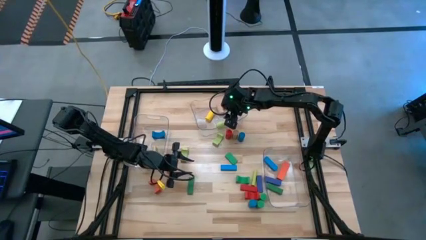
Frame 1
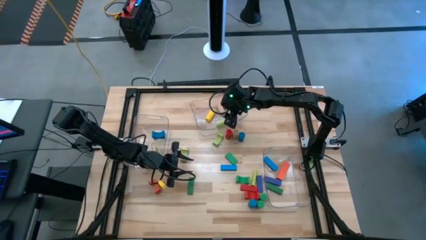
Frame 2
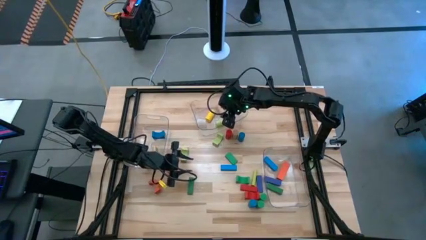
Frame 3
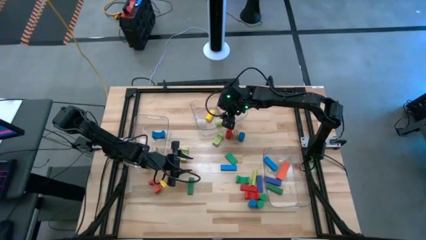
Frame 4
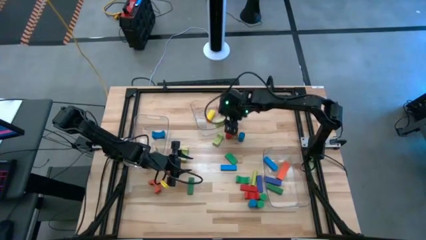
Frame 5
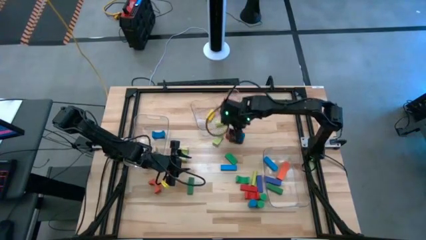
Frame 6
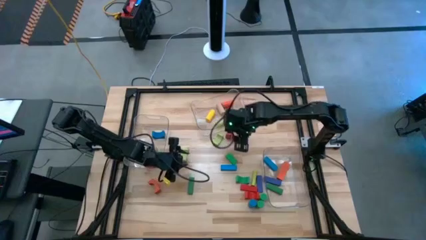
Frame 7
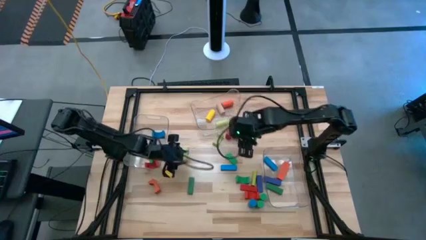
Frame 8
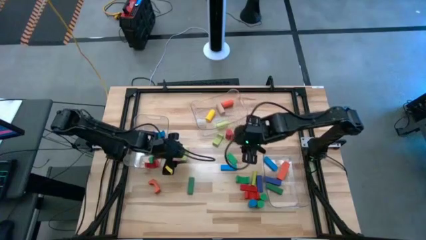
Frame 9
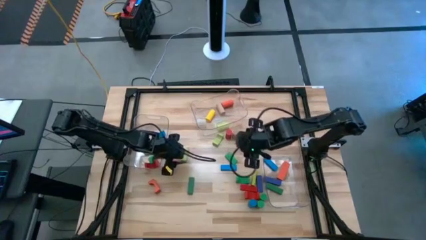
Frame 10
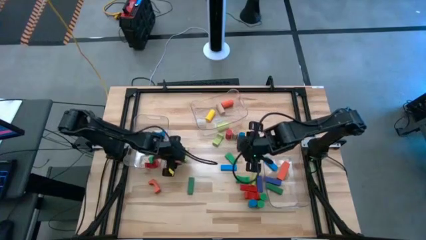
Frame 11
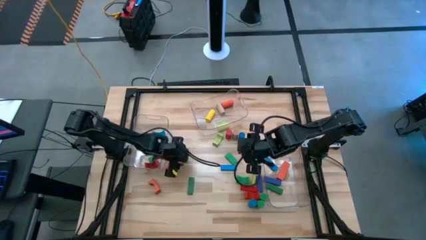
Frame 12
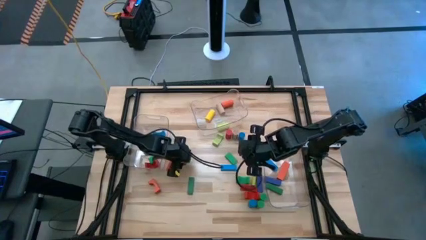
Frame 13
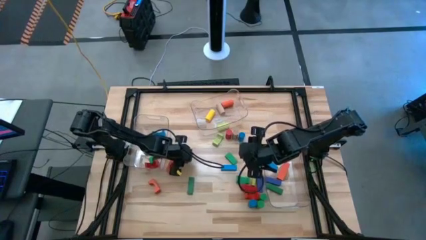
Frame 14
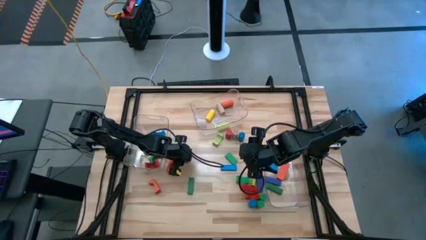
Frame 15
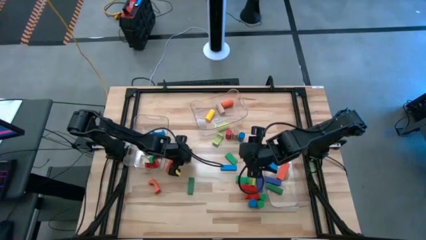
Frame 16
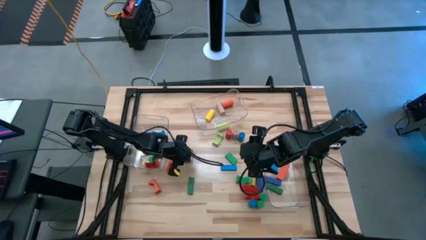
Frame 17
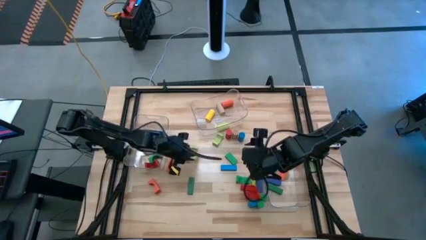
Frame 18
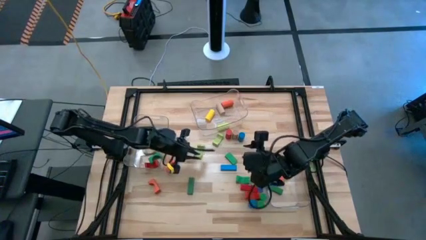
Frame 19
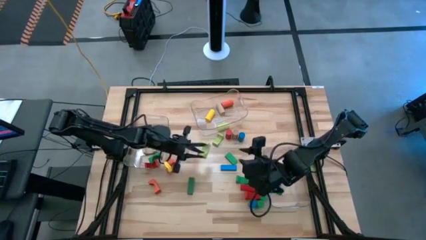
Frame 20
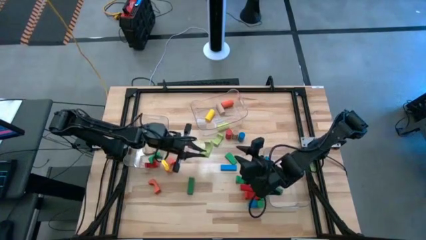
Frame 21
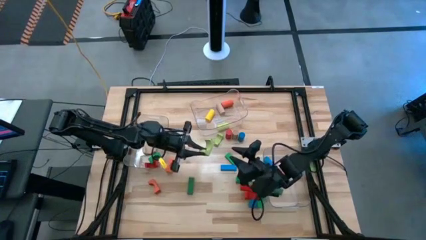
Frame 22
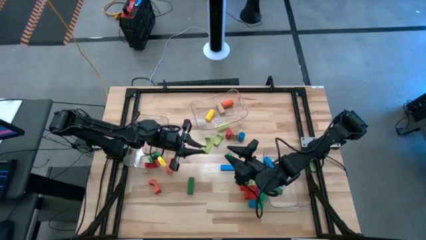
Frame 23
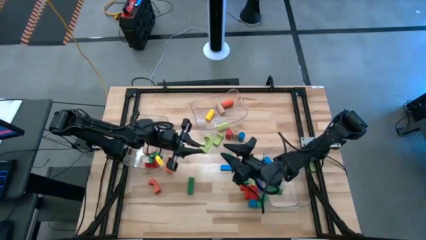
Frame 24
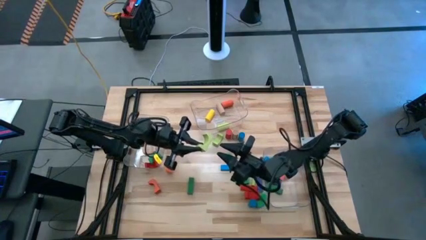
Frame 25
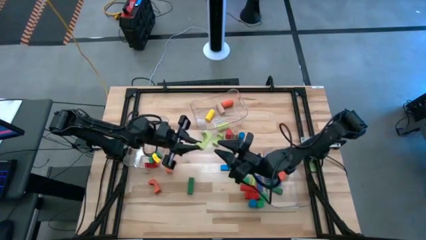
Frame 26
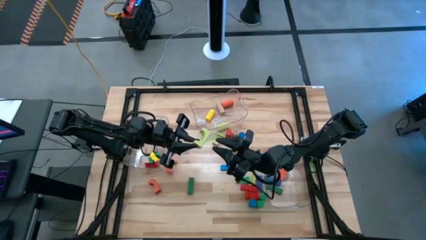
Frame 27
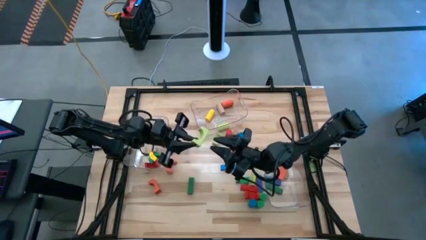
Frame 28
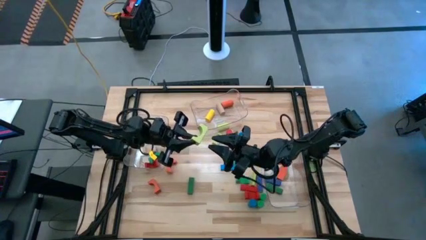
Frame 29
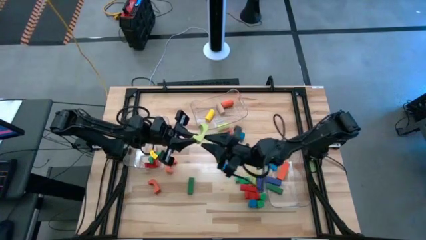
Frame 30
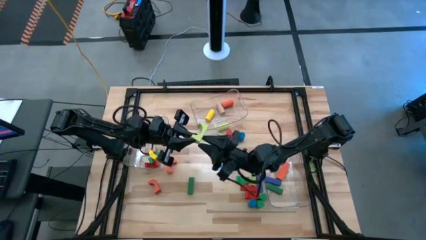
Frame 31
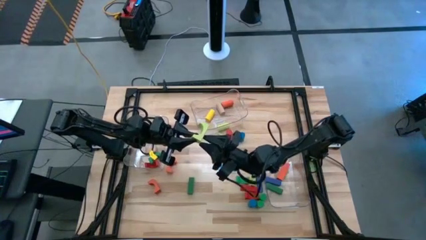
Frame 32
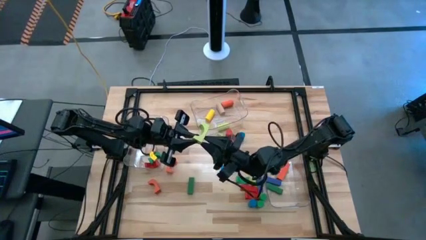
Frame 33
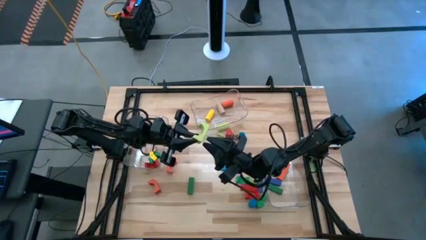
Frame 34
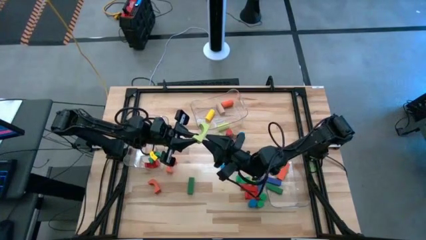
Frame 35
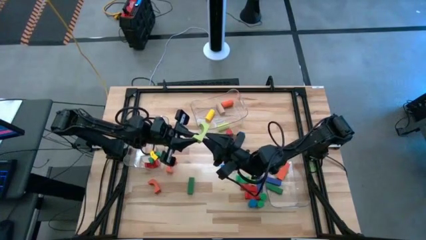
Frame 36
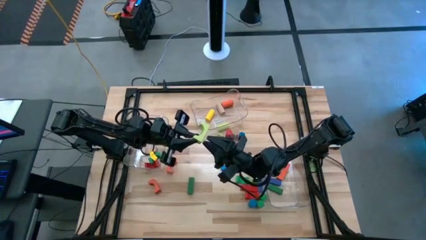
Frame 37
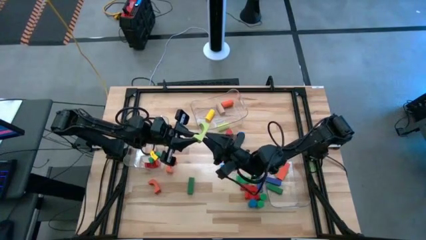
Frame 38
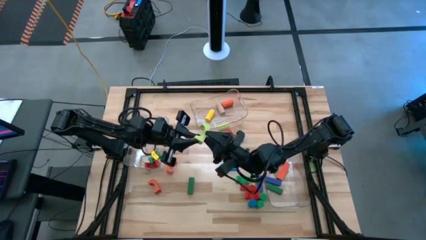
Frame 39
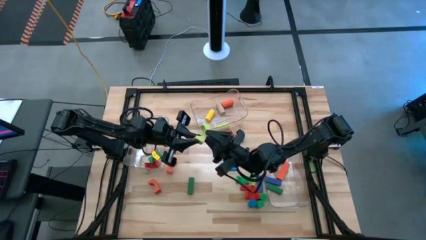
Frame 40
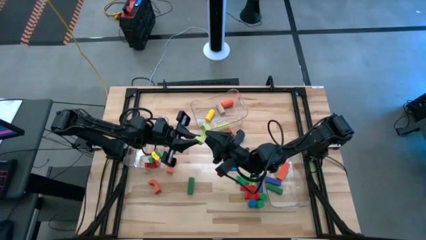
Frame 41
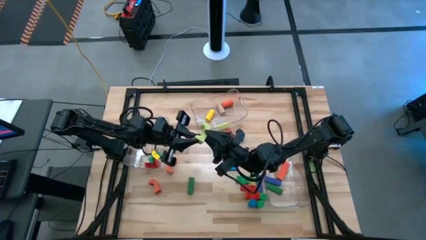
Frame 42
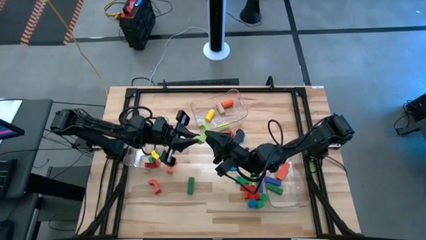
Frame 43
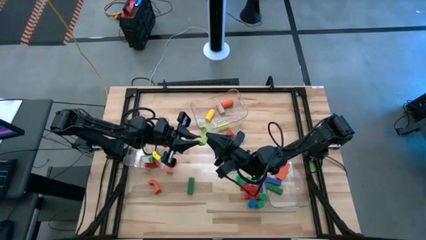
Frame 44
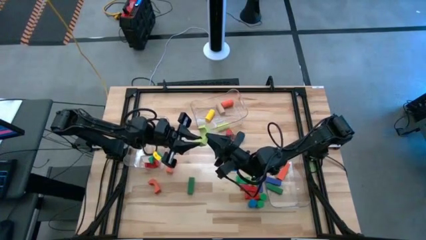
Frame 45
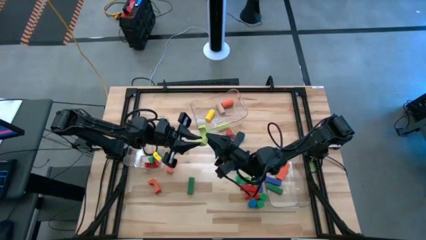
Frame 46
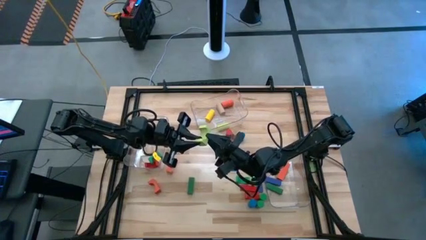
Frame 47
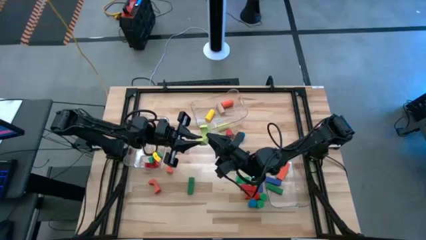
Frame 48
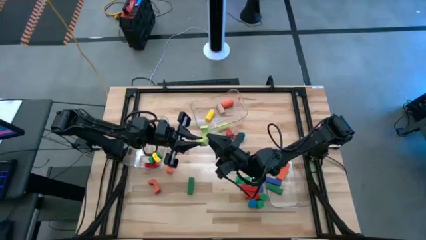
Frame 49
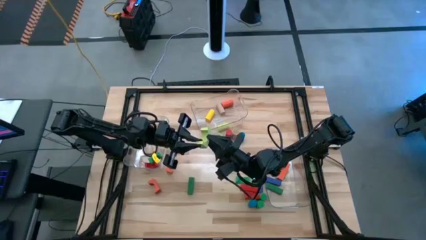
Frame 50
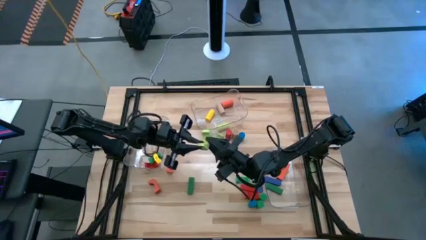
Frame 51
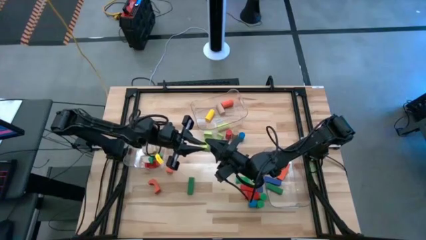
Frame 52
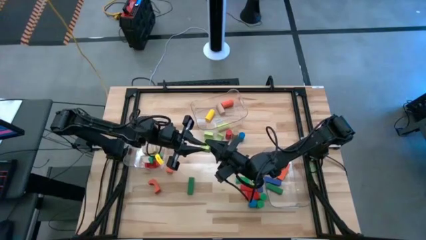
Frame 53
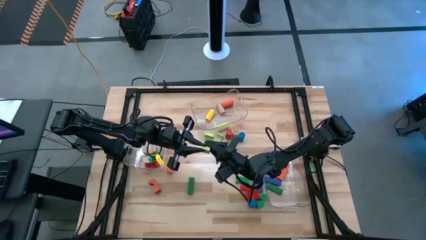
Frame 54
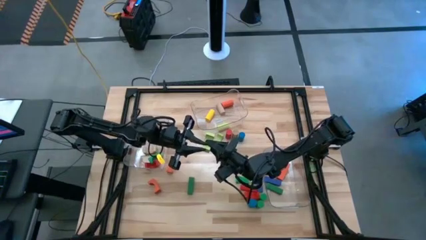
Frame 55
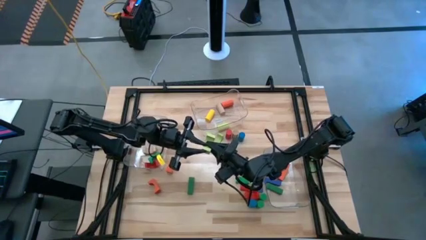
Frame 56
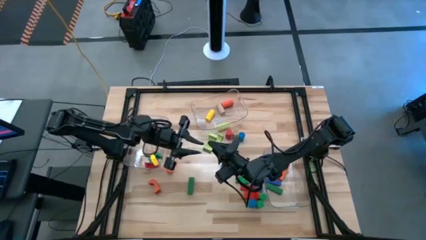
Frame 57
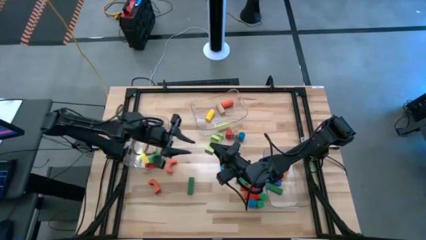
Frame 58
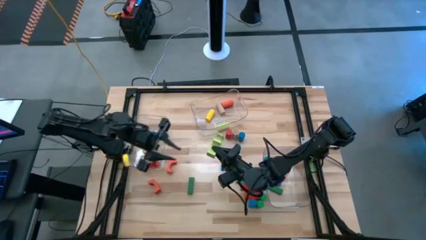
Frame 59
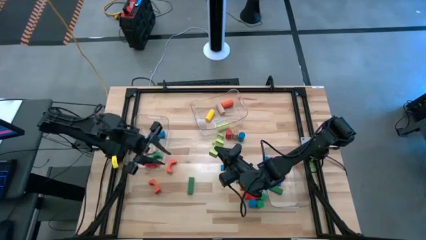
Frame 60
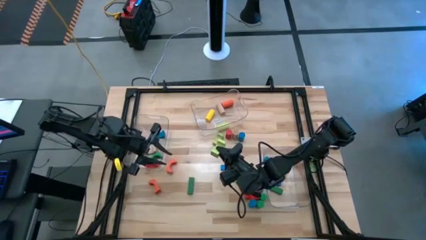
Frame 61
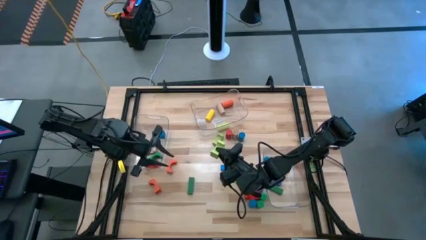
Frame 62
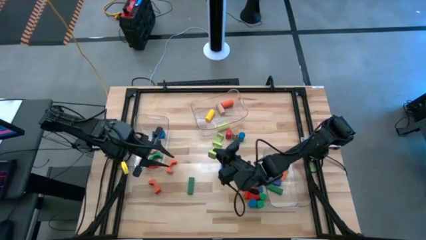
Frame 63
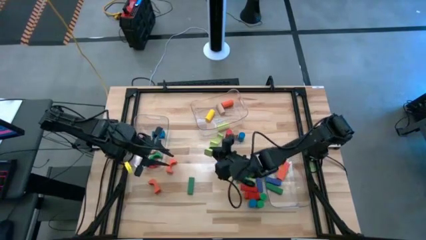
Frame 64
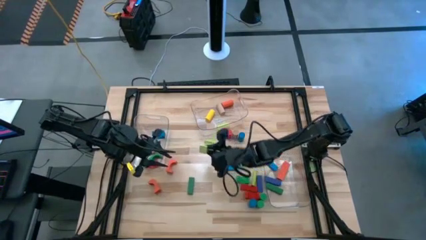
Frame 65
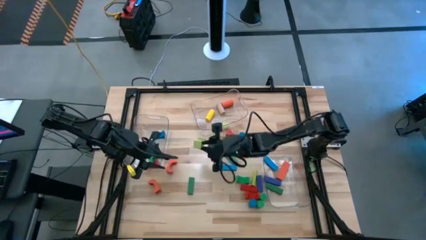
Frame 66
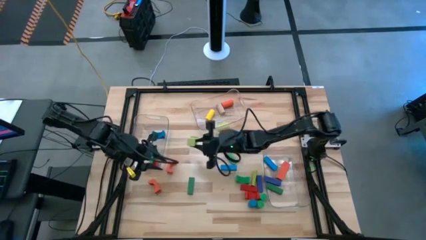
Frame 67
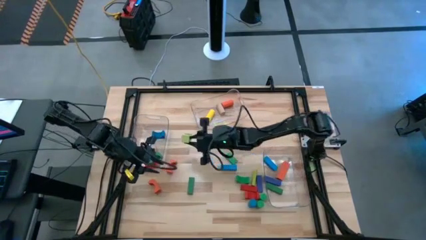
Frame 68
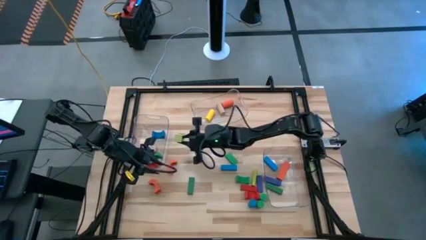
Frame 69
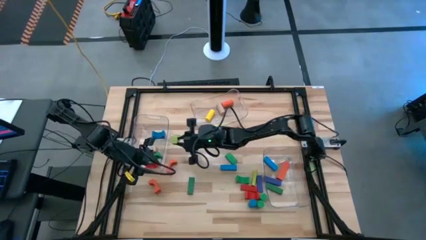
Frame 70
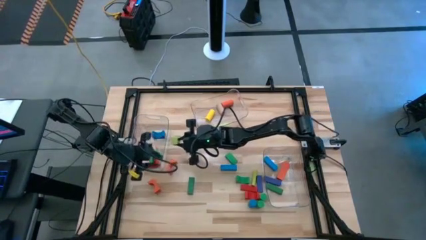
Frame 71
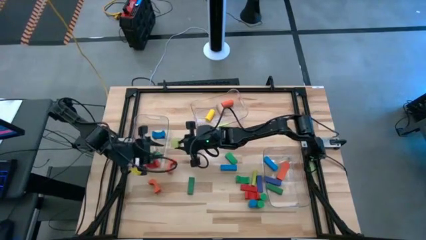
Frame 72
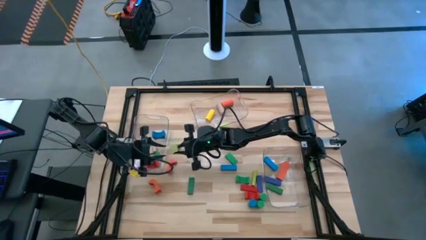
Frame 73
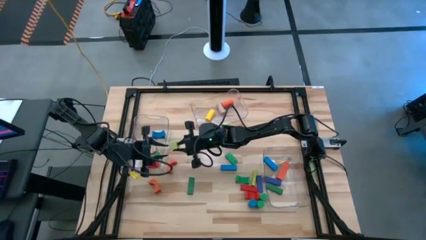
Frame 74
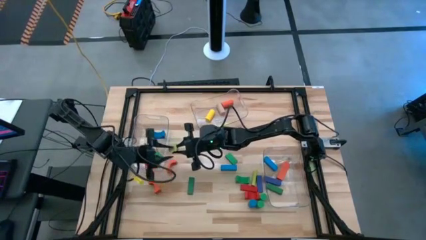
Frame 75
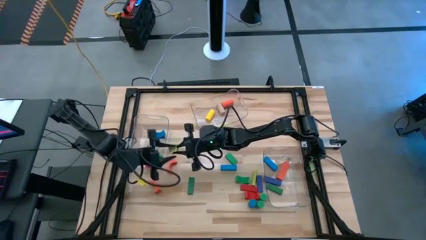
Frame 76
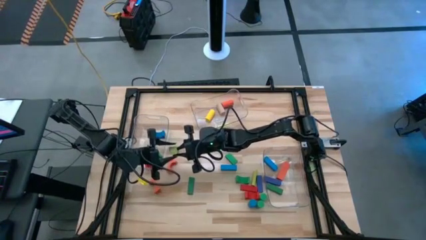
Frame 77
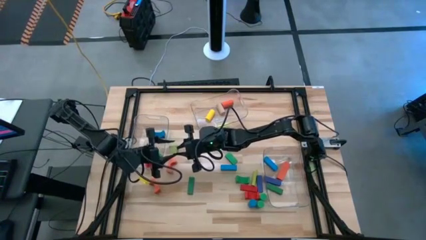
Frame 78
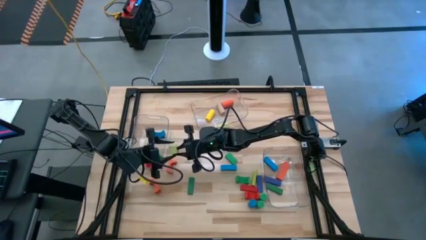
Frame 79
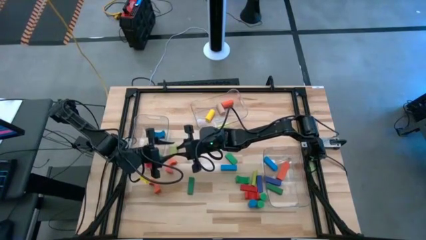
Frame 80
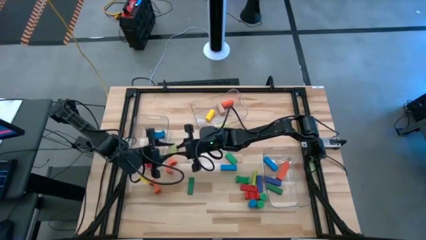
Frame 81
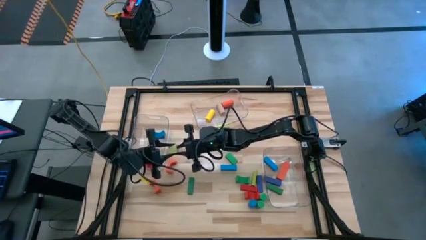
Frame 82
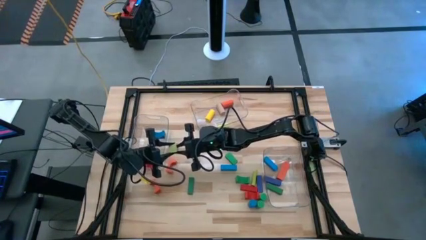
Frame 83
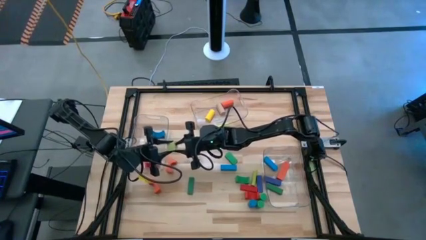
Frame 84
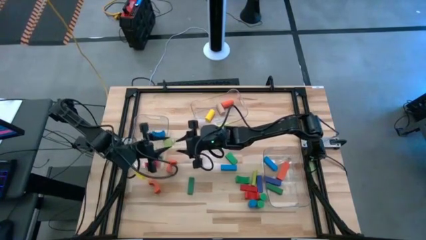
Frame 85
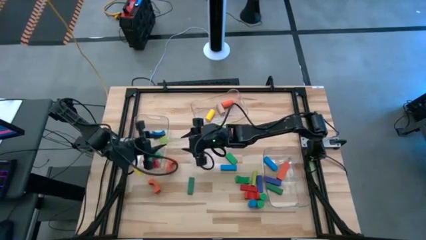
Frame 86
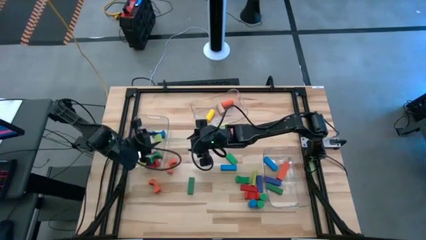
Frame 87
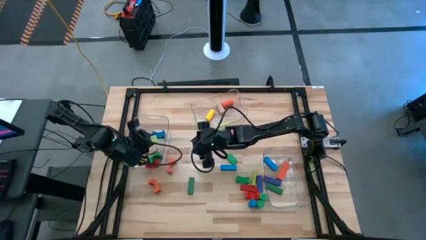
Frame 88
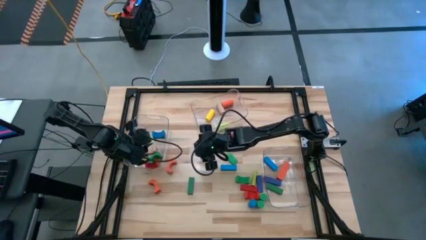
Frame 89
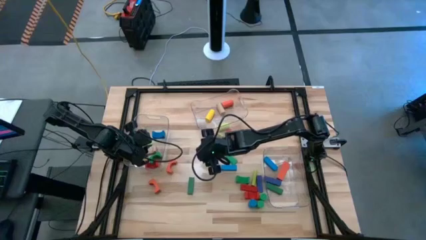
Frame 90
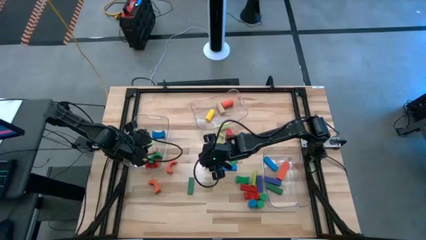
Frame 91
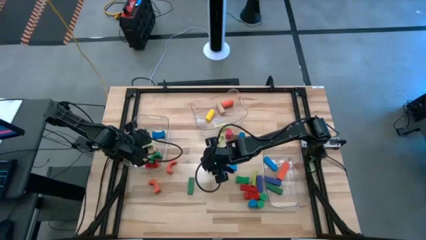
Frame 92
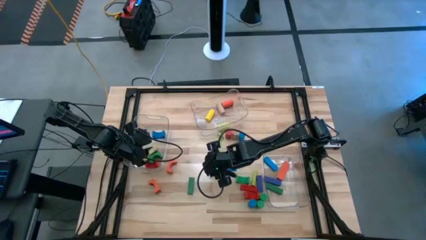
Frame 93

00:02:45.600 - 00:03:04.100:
Task: Sort blocks by size
Put the light green arch block into the left transparent bin
